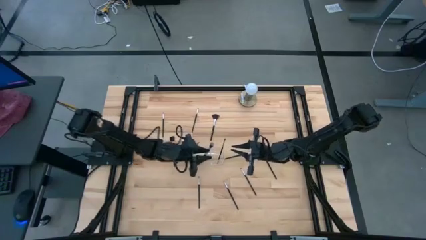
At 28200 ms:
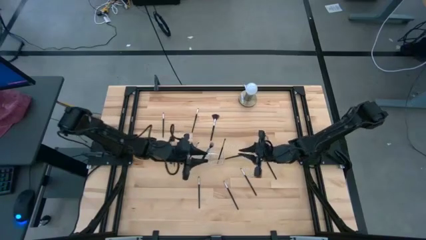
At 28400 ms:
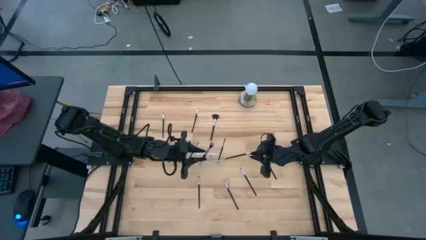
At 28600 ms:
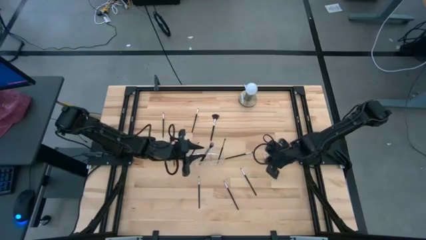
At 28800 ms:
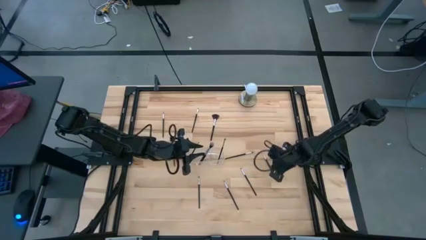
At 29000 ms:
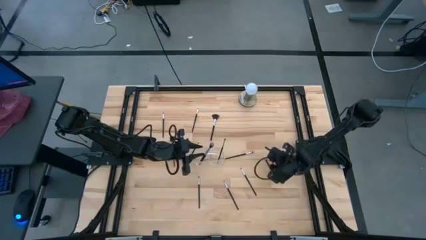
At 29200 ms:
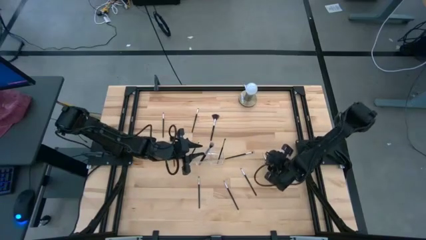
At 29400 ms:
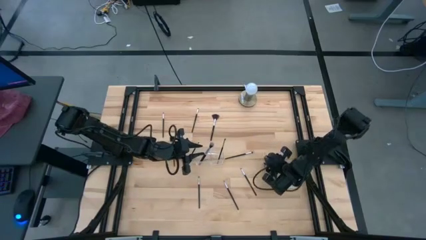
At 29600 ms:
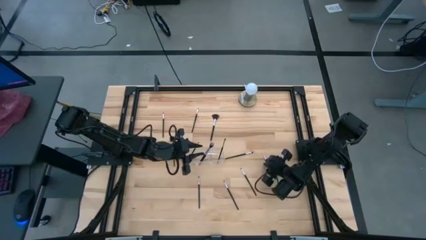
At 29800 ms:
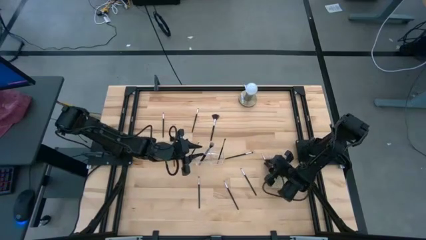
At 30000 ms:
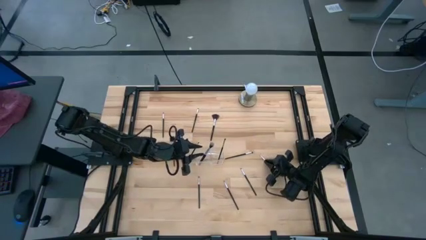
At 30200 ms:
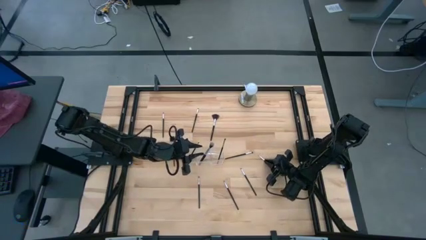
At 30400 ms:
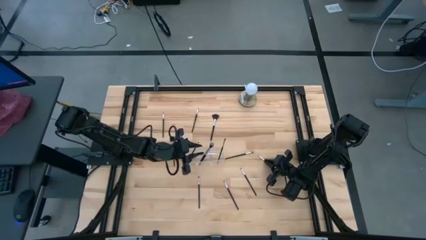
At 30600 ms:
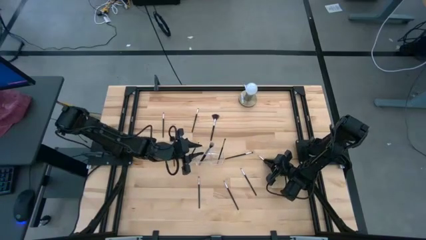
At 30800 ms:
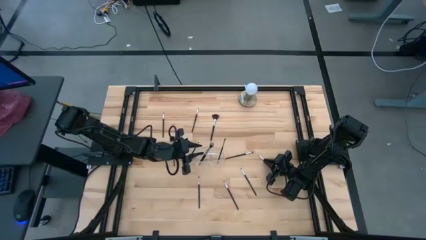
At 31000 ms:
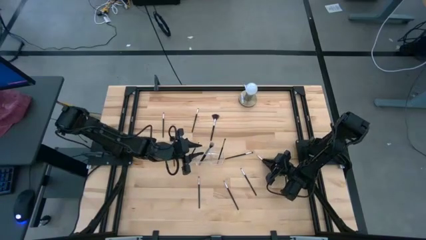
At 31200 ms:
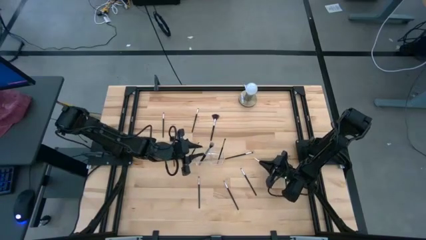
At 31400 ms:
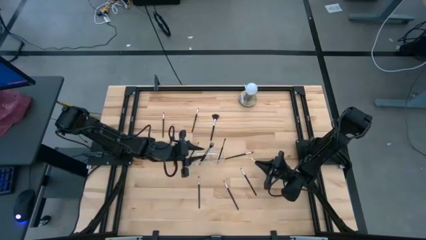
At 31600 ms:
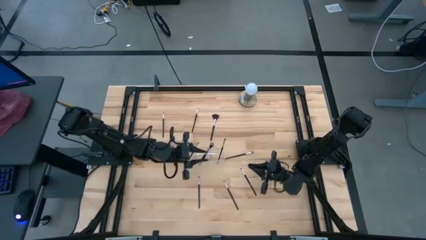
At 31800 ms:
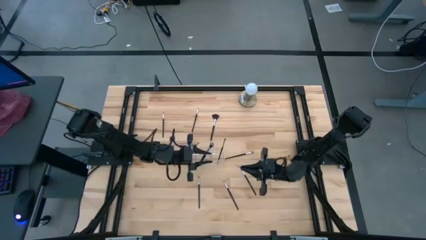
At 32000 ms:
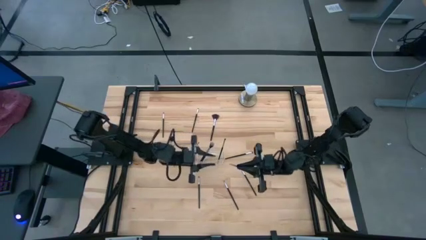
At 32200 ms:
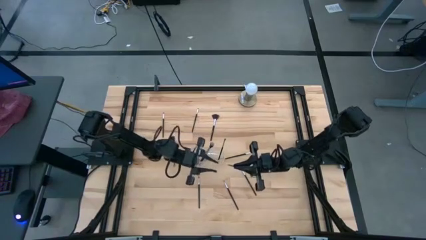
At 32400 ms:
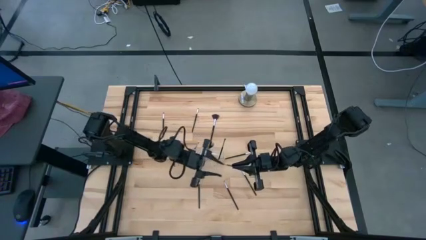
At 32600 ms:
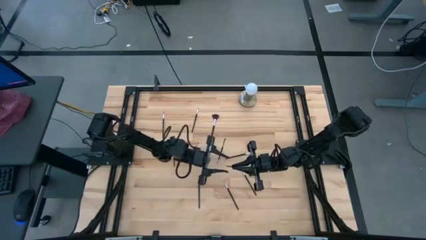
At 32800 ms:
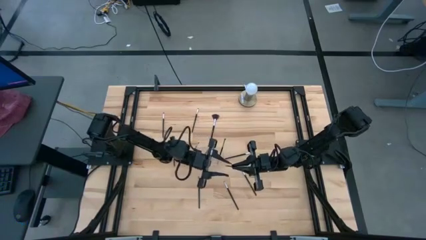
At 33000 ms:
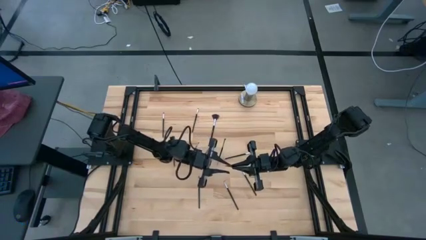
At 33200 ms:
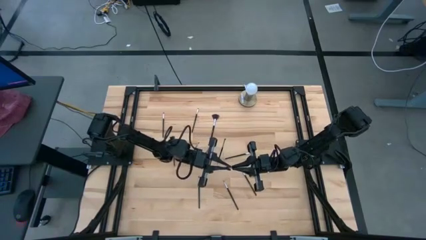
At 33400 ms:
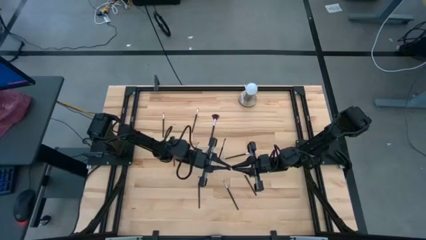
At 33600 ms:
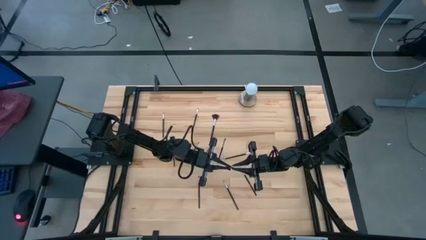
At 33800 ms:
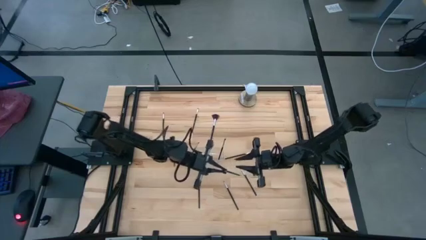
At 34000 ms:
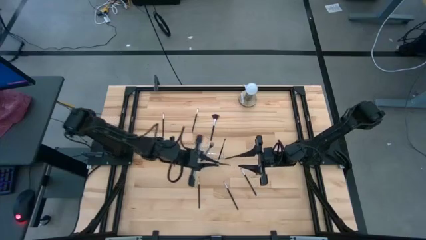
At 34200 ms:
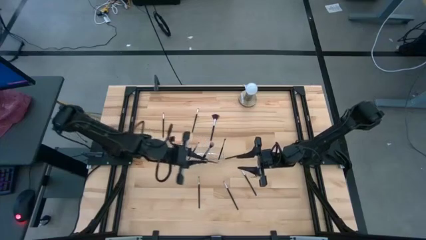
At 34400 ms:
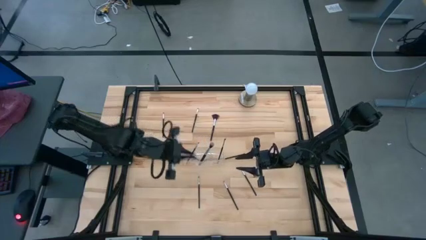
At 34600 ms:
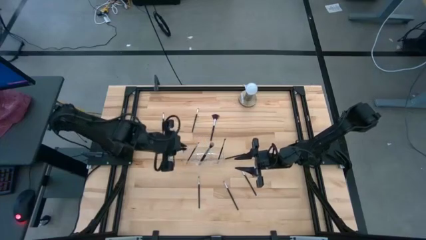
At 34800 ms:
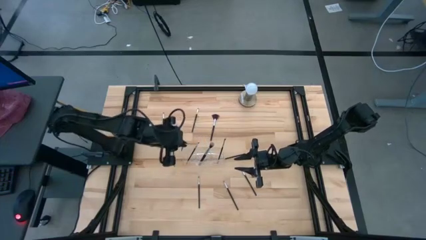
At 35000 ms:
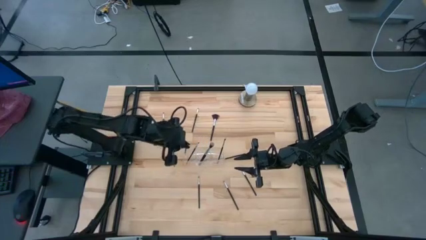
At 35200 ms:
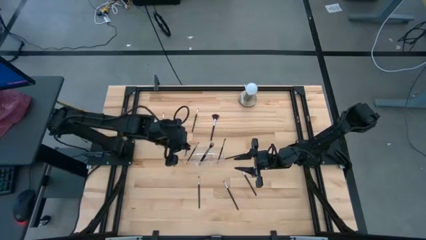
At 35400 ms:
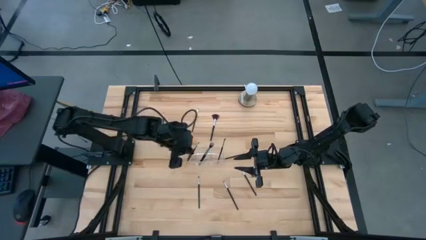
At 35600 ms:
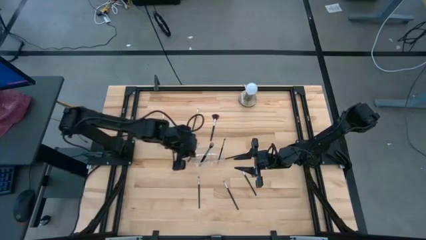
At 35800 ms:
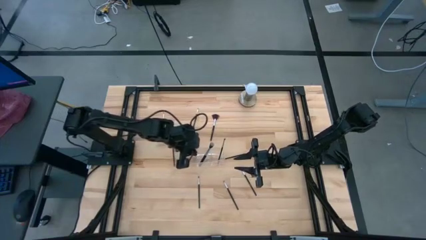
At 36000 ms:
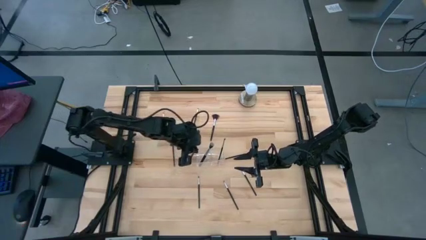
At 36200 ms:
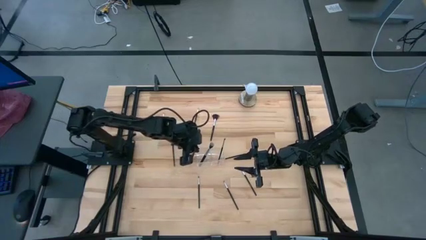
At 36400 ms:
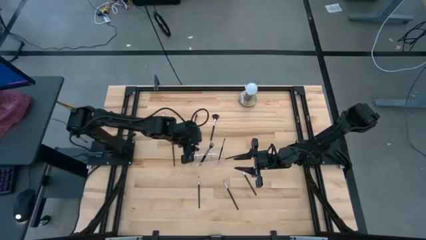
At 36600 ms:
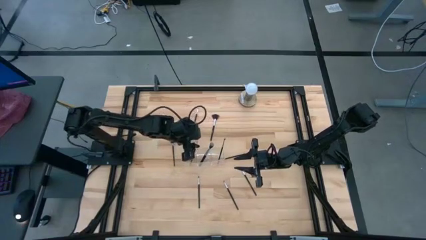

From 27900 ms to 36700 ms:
Task: Put items in baskets/containers
Put the liner brush into the transparent organizer

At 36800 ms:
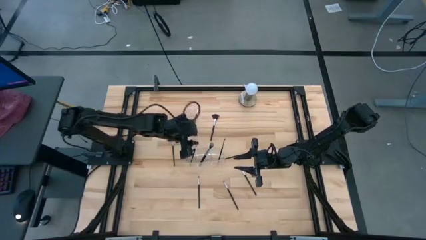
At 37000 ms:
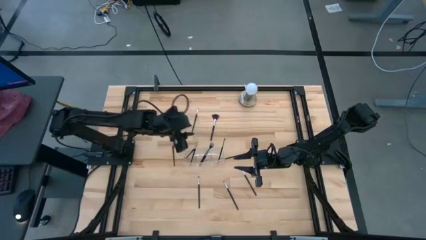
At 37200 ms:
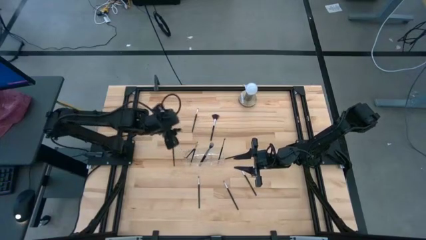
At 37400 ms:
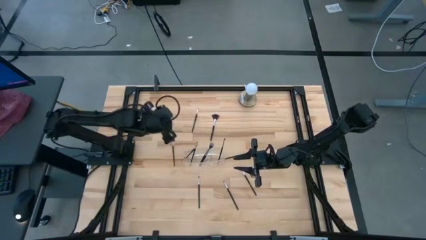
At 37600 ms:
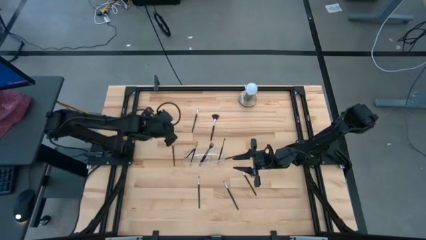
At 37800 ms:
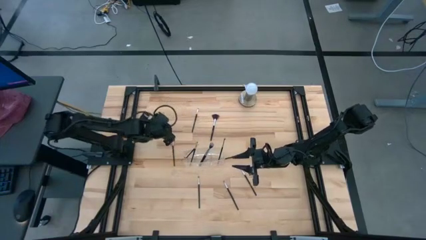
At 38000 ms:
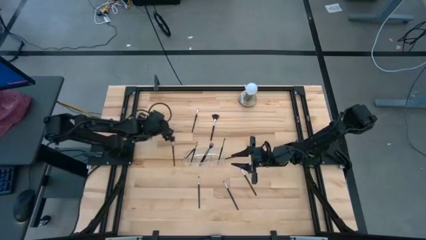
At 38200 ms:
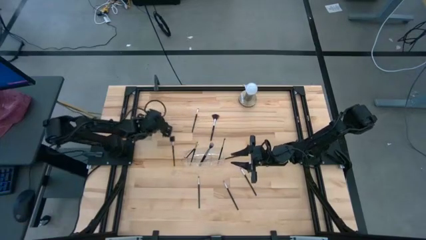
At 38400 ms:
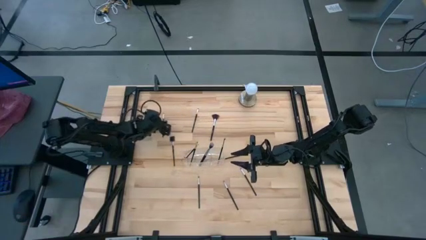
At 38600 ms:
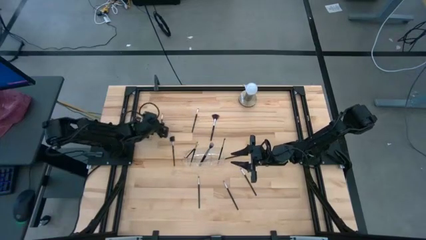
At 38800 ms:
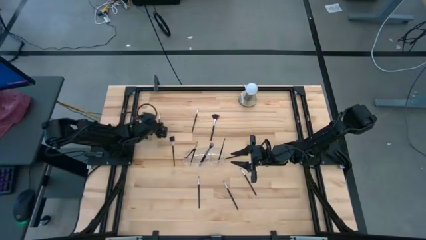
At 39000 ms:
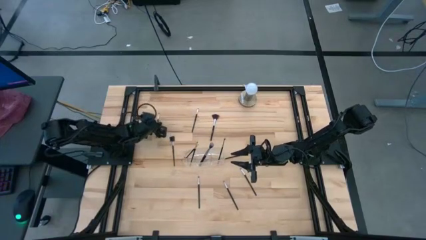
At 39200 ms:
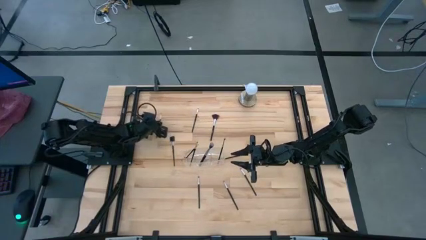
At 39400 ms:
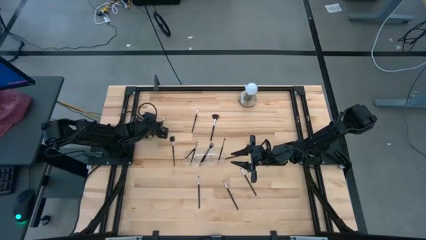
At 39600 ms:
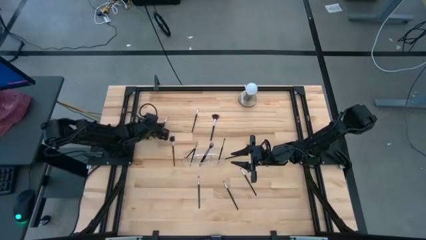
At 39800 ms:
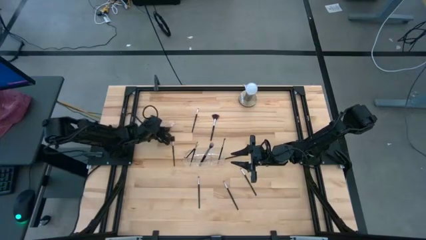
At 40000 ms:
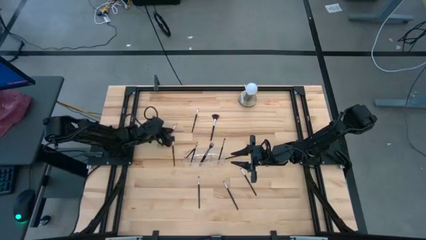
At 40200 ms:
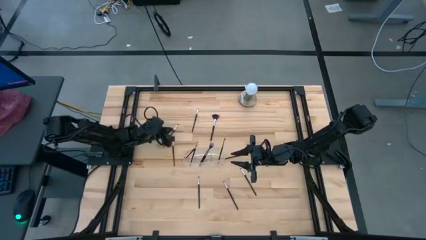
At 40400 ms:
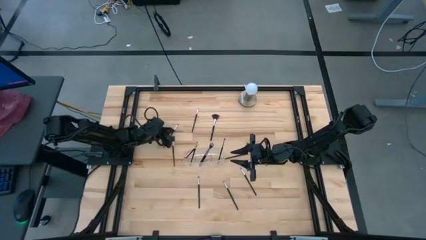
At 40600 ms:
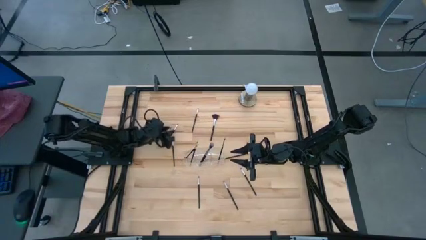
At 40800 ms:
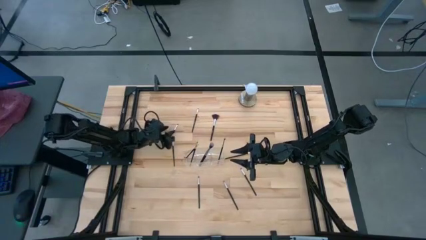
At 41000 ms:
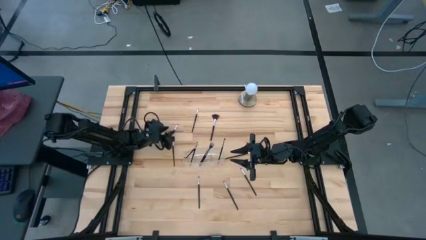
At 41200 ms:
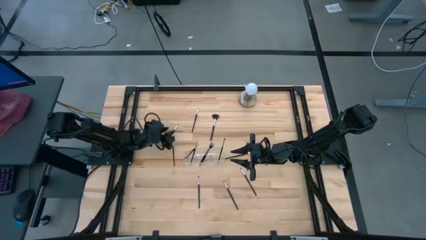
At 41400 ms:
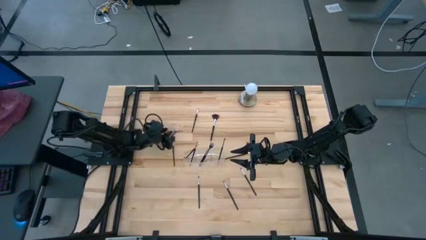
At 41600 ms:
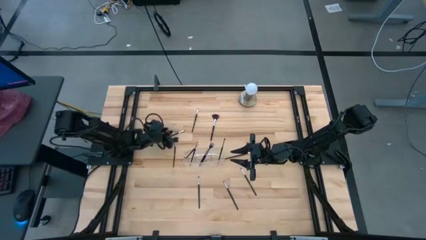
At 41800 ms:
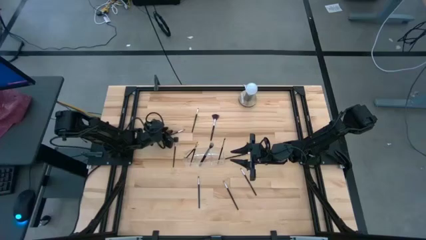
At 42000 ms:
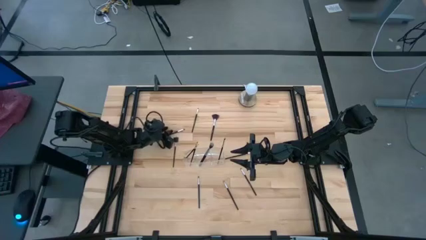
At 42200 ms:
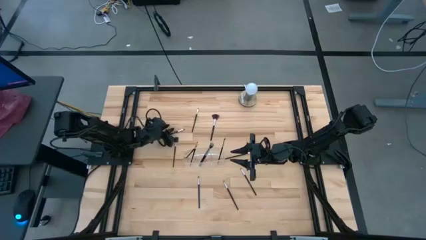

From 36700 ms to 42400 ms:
Put the eyeshadow brush into the transparent organizer

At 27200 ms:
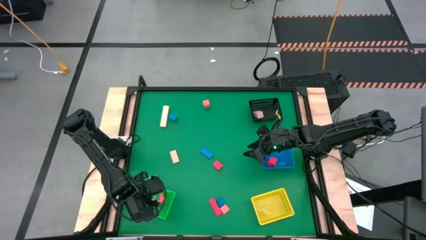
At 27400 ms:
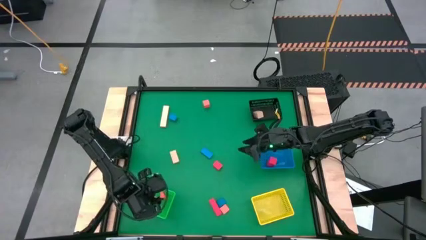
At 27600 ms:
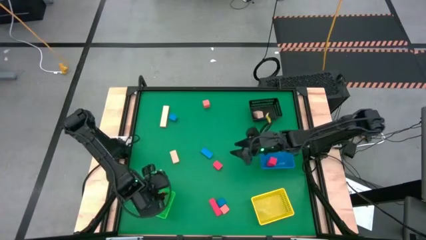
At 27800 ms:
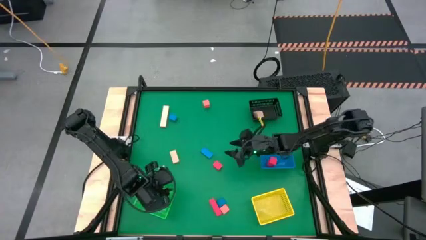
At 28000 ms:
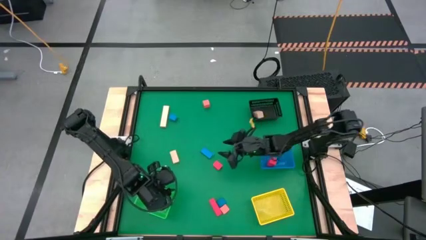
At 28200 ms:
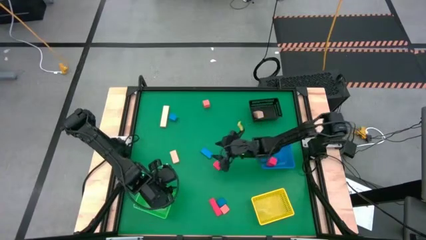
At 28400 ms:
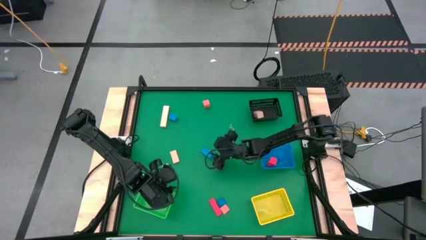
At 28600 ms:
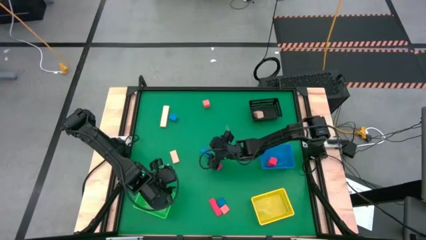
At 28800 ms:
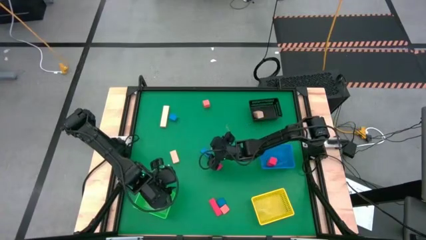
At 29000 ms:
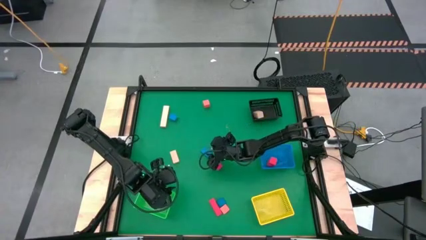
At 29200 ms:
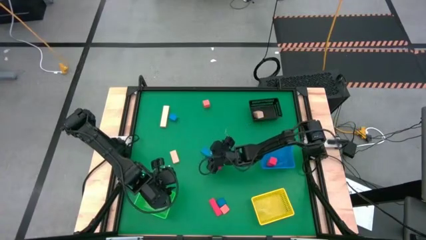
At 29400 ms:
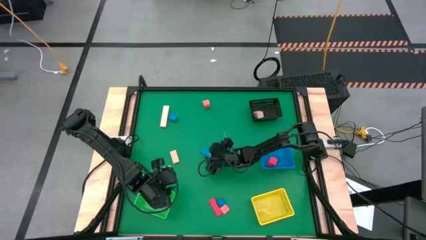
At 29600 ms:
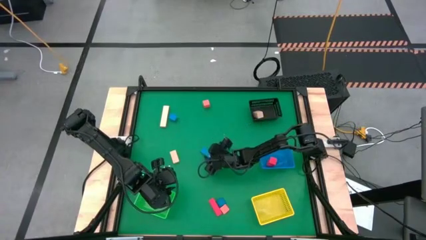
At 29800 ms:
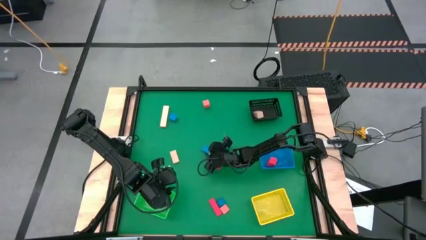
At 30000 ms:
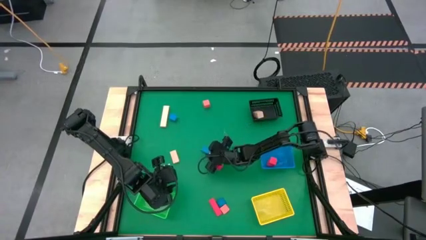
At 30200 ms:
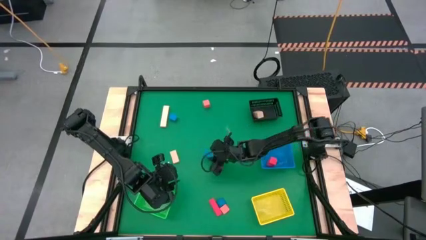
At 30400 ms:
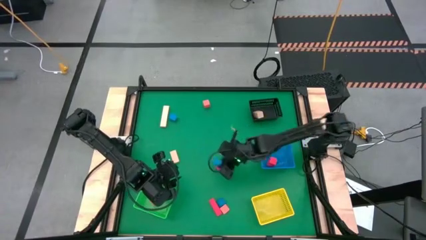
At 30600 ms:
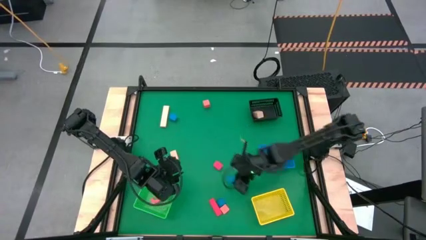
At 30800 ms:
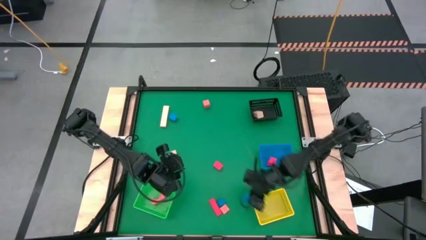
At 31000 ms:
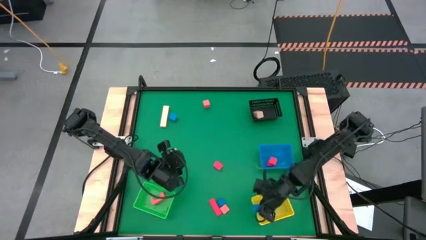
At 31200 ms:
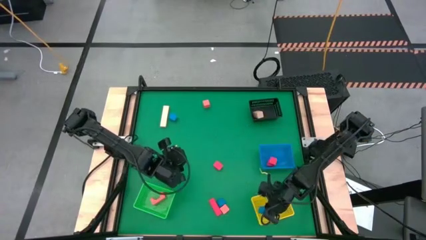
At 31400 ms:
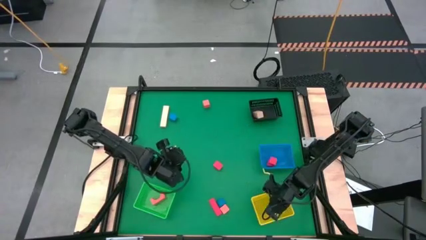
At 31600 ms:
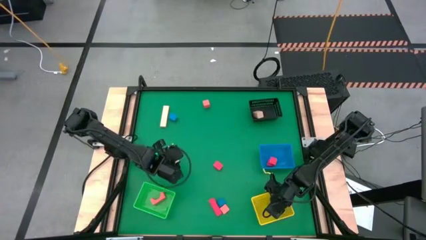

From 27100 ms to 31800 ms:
Task: Sort & place blocks by color
Put the blue block into the yellow bin
